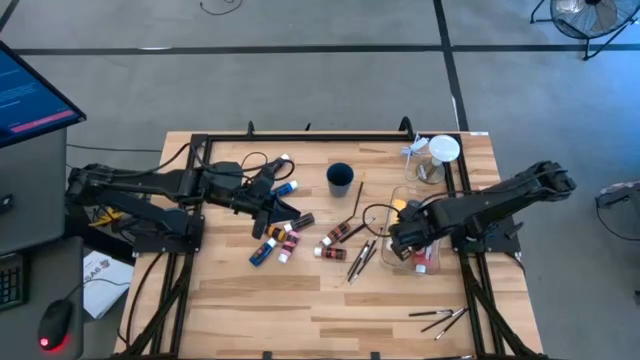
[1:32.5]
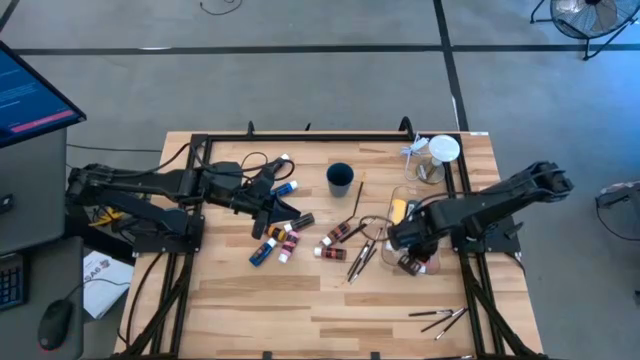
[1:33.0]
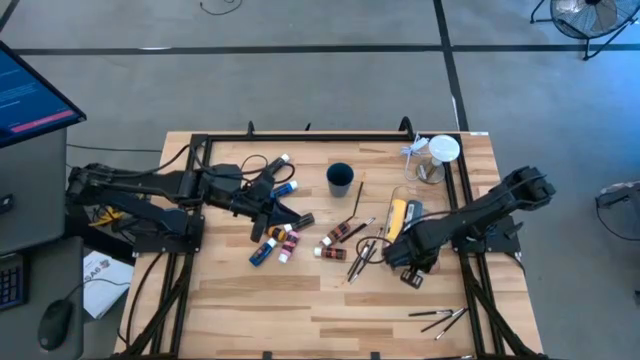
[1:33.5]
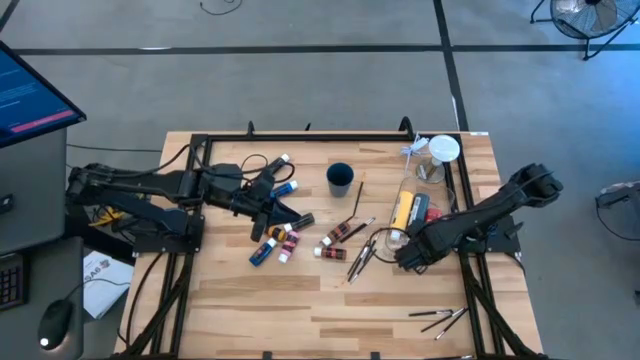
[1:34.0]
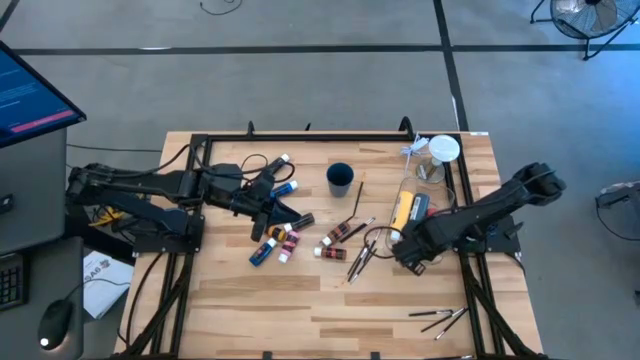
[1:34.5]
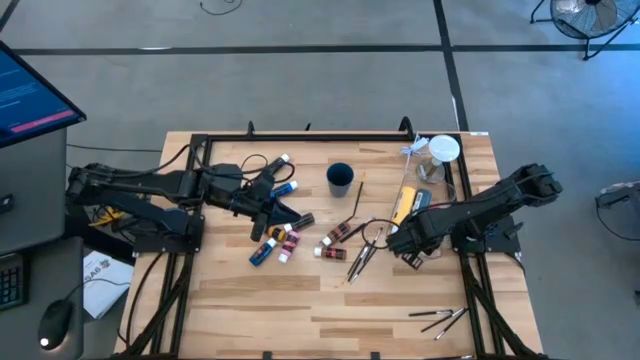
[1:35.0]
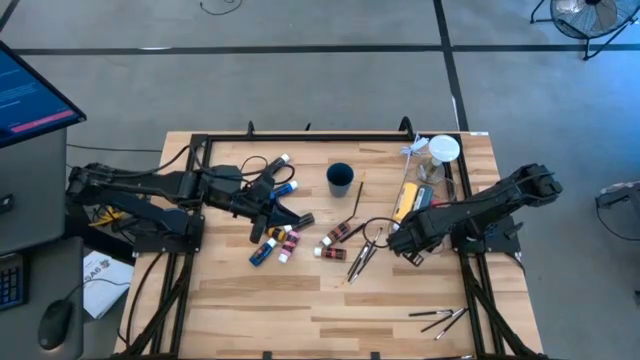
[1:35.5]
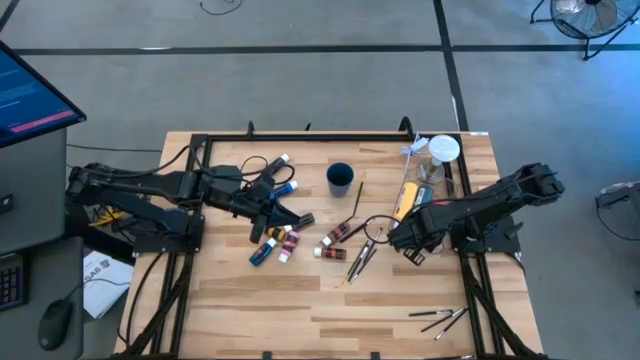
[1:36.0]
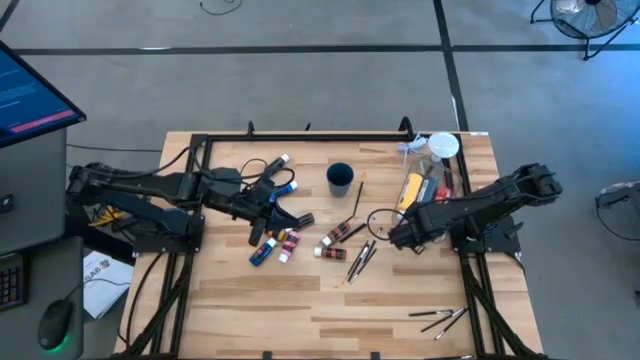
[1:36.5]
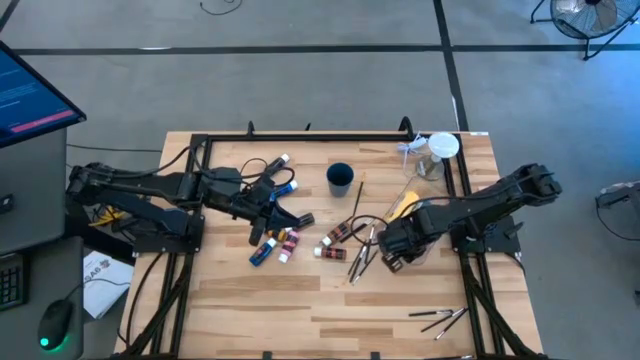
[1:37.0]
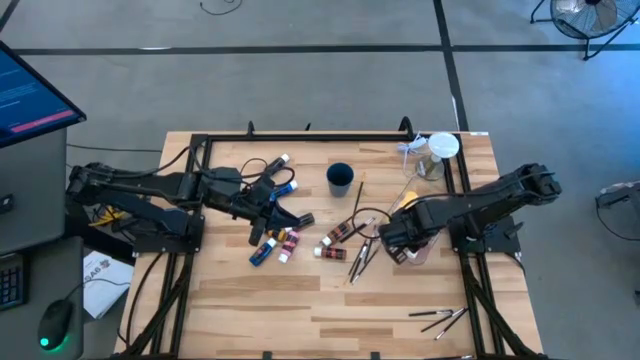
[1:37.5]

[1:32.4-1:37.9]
Task: Pick & Place Paint Supplies
Adjust the red paint bottle in the transparent bin

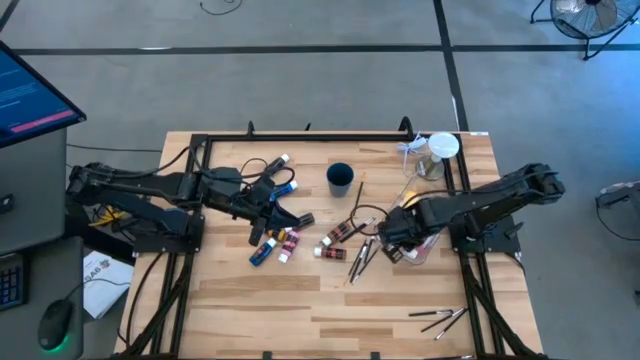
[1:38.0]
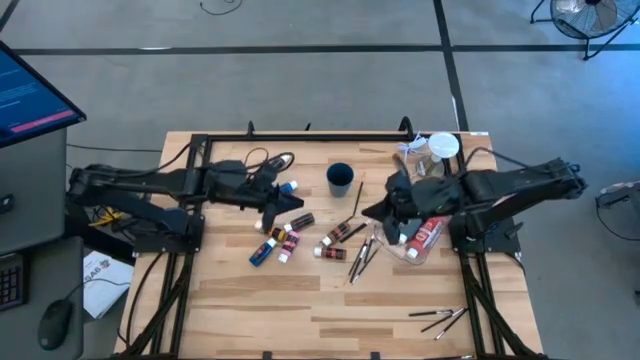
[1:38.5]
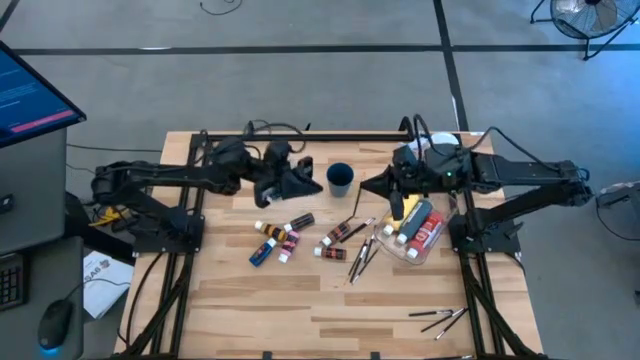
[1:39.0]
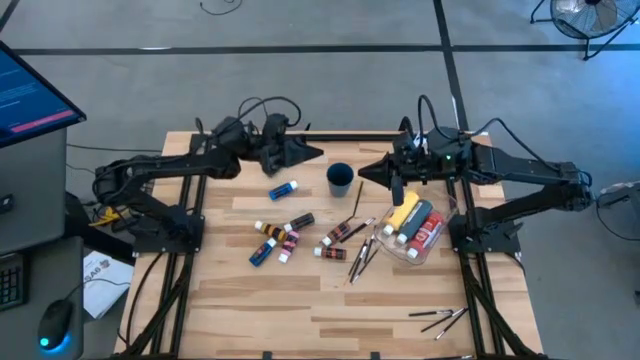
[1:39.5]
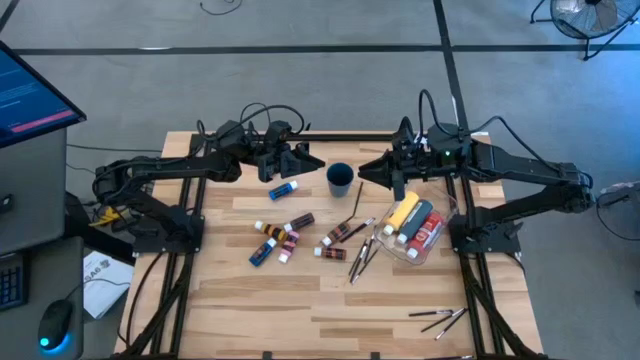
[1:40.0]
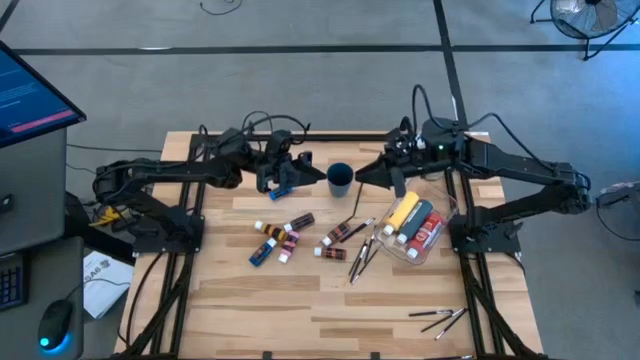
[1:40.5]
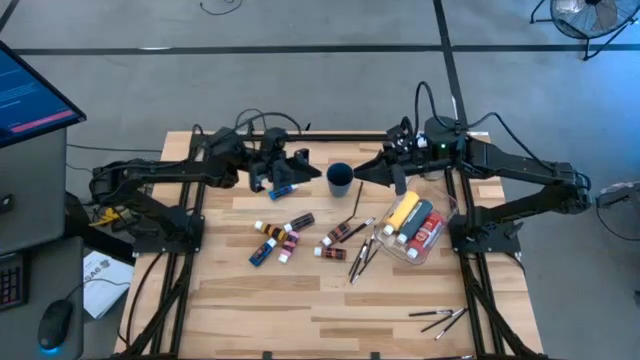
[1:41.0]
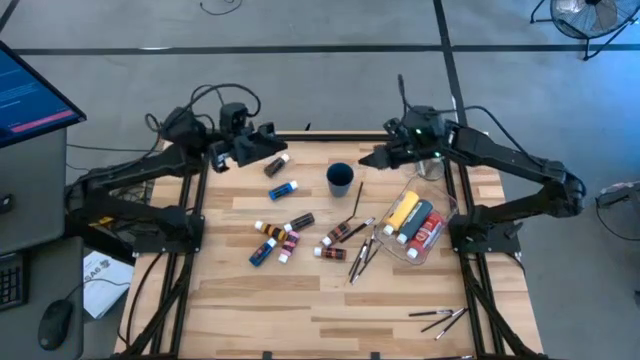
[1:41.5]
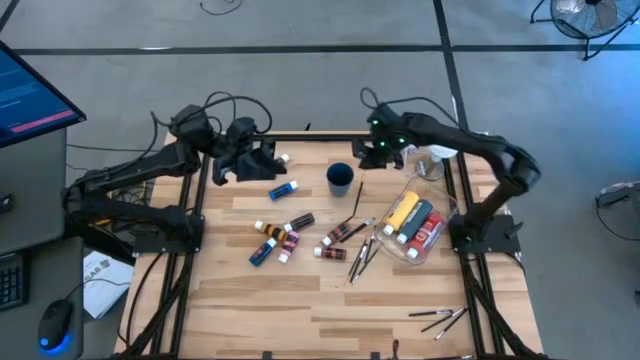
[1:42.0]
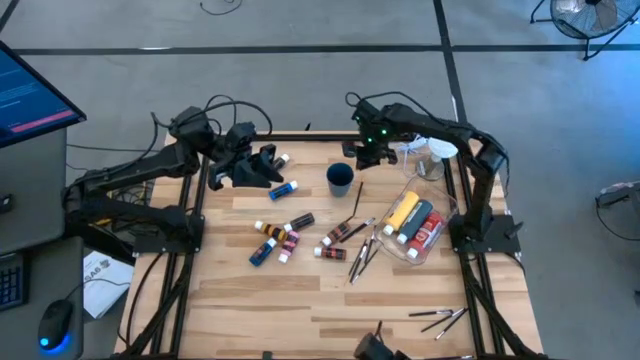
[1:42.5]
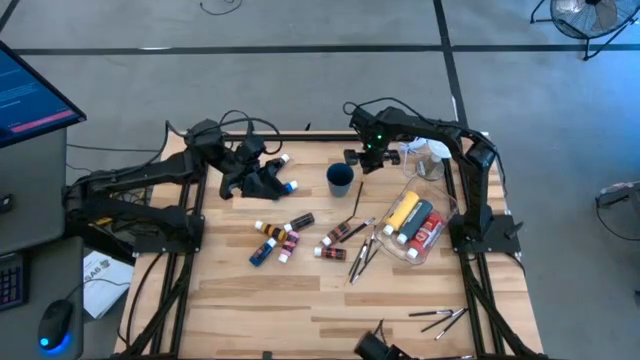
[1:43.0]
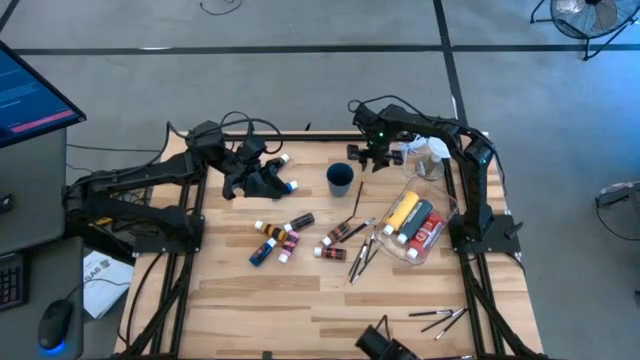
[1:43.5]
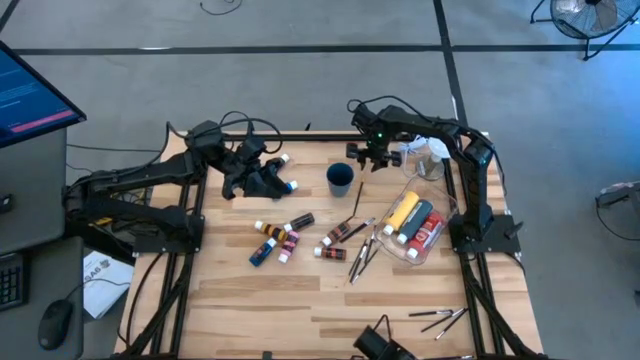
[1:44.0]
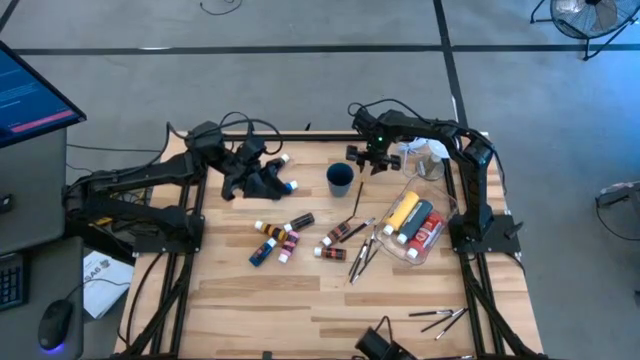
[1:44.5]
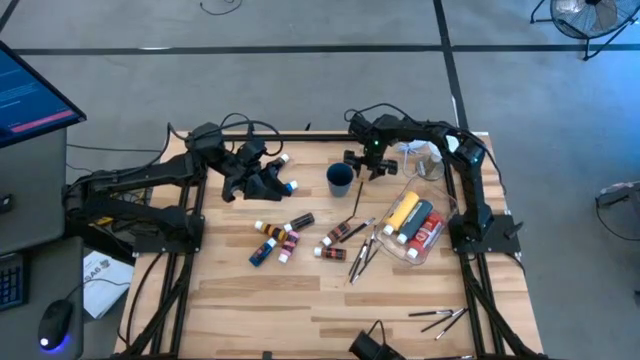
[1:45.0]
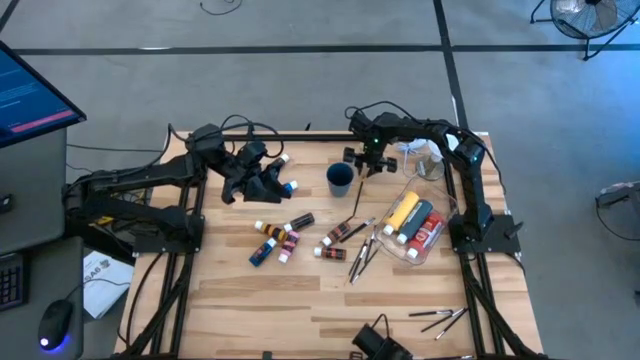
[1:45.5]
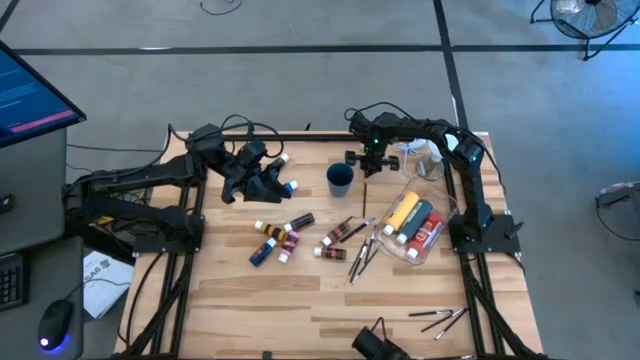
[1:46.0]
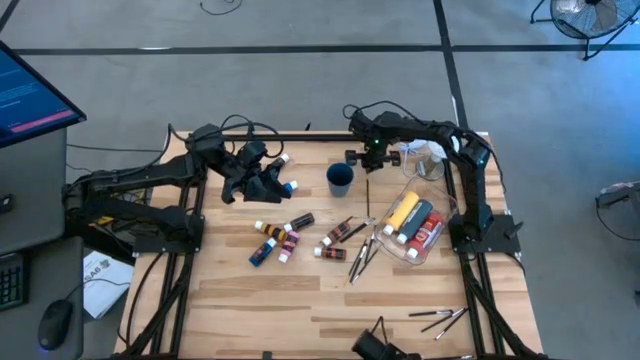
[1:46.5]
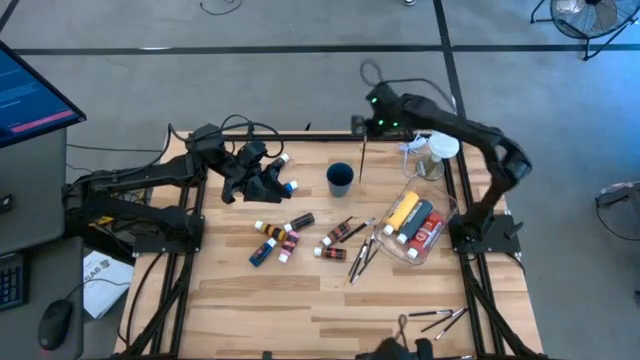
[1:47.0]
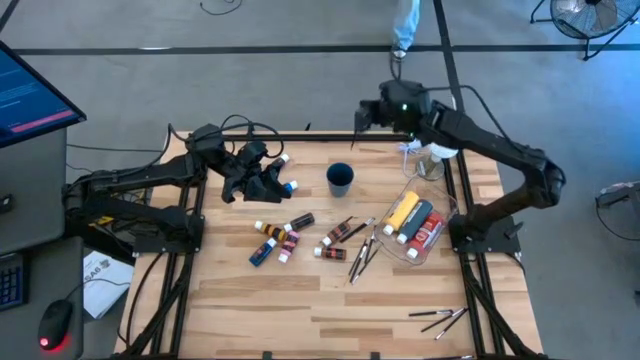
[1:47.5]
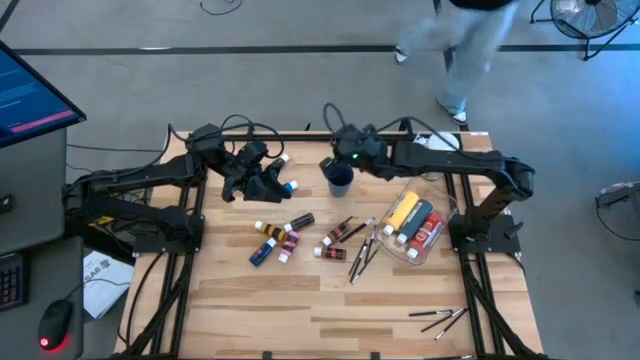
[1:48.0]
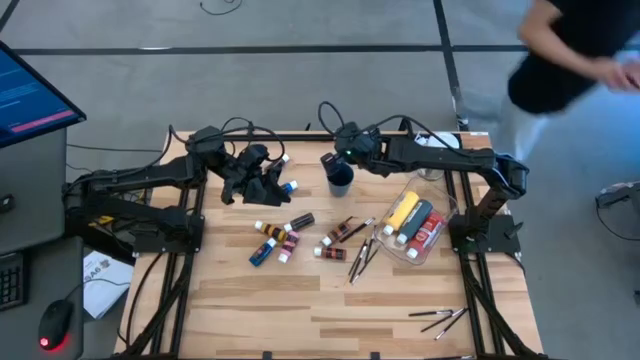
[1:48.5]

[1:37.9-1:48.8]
Put the top paint brush into the blue cup

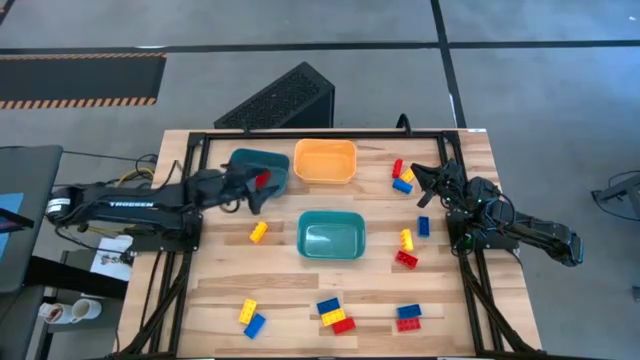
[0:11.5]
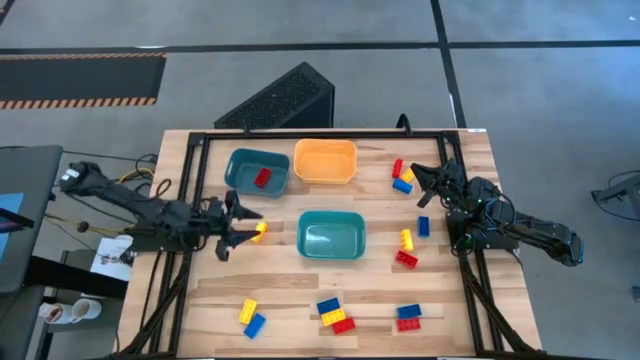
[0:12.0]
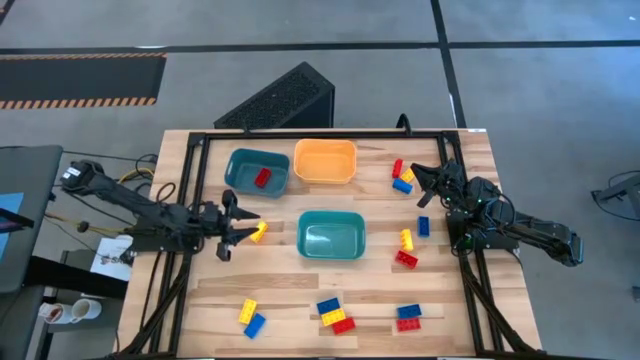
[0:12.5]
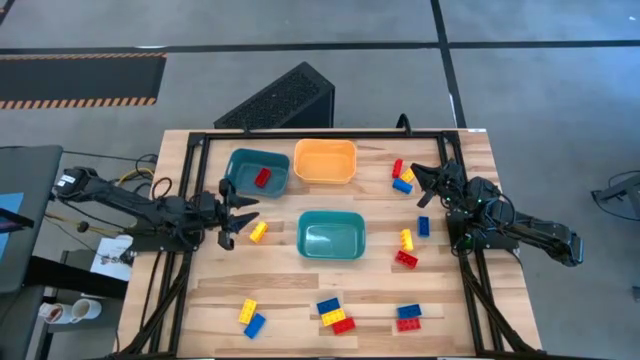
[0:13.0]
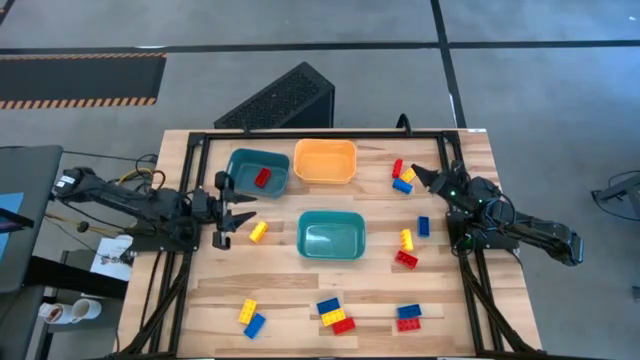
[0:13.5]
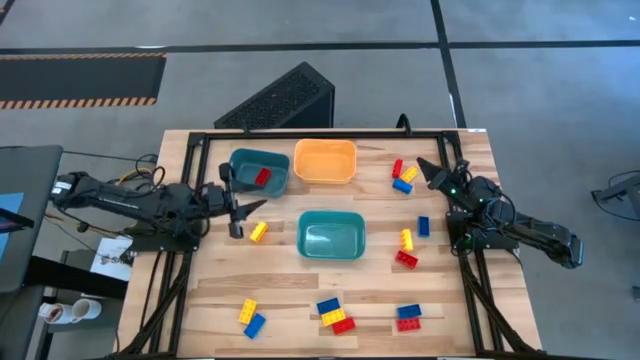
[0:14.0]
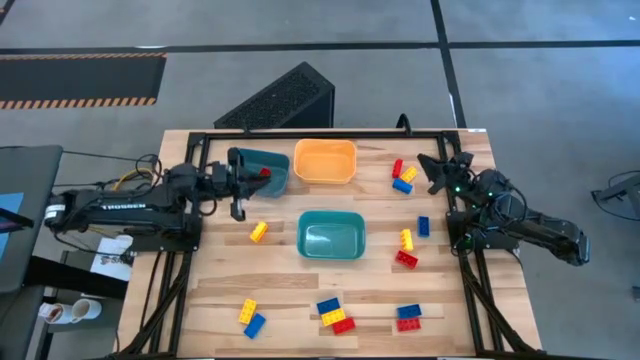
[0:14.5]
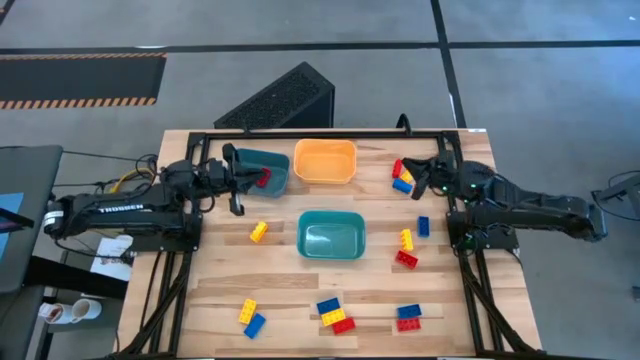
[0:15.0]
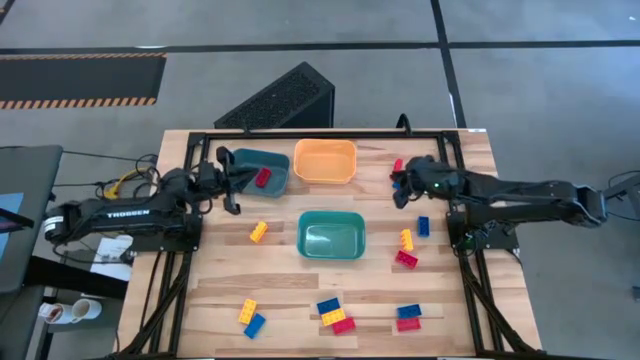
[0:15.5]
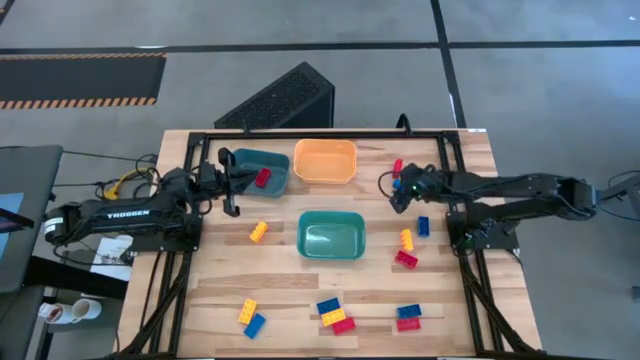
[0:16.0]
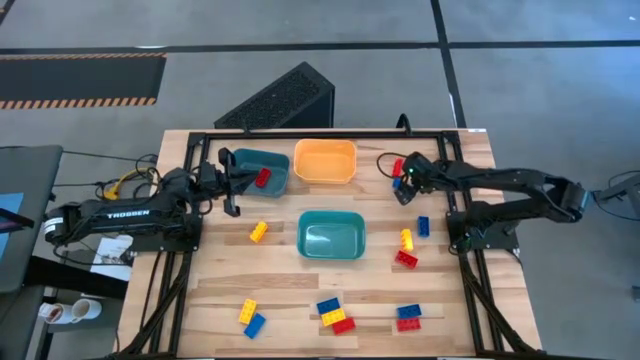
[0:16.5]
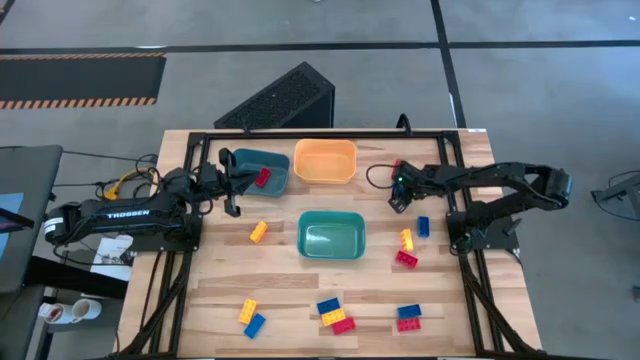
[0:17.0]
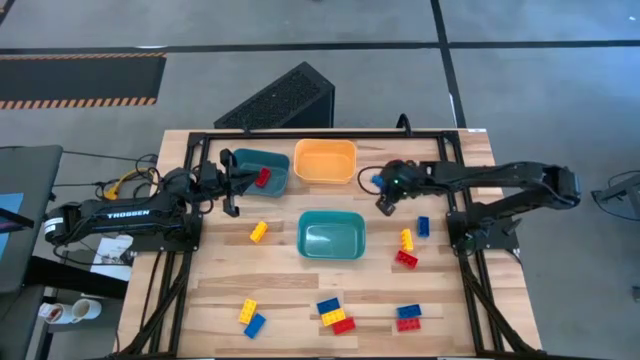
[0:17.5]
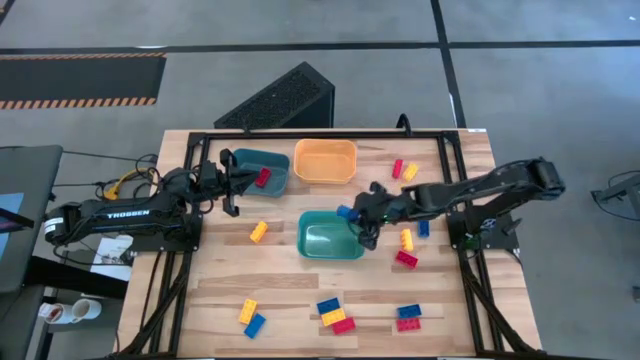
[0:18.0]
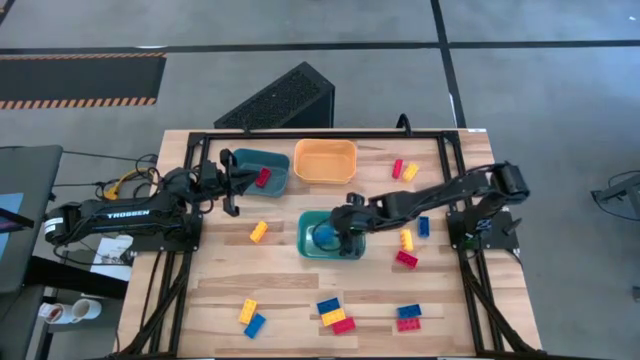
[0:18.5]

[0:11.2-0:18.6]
Task: Sort & place blocks by color
Put the blue game piece into the green bin
